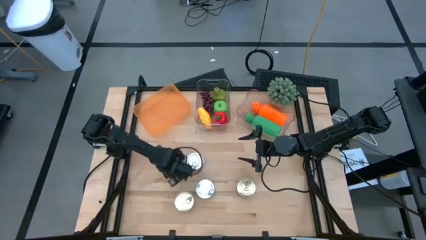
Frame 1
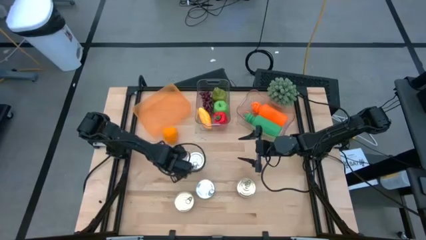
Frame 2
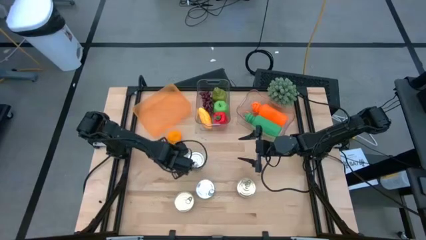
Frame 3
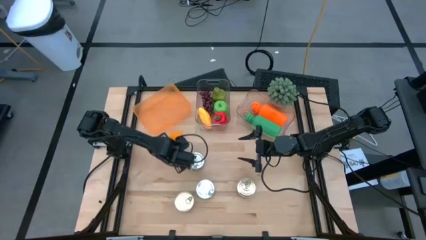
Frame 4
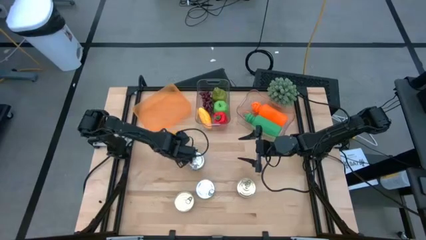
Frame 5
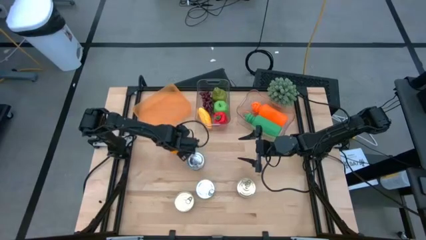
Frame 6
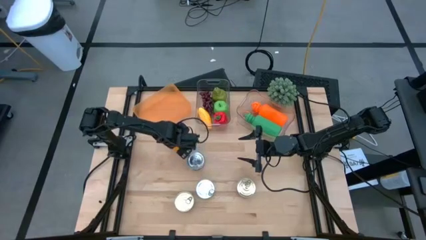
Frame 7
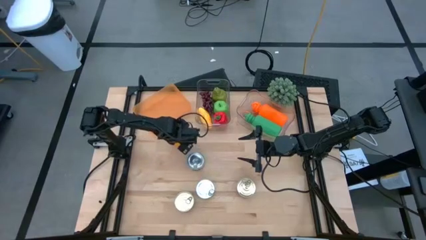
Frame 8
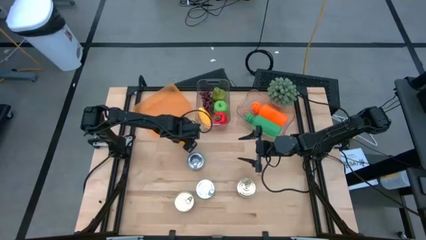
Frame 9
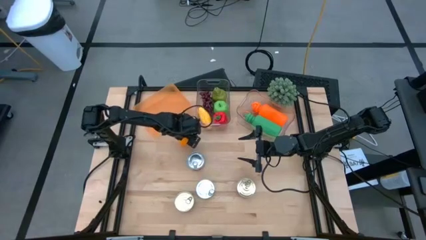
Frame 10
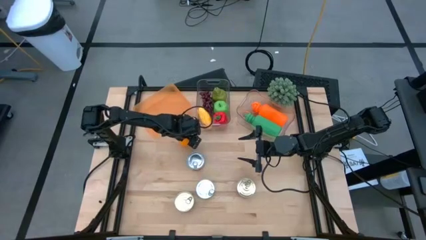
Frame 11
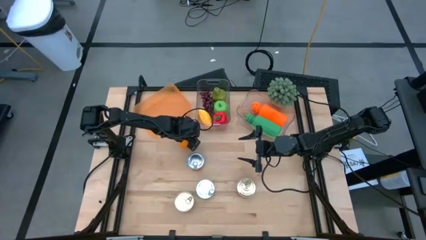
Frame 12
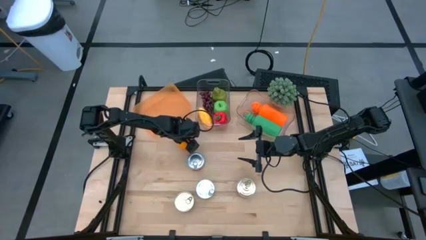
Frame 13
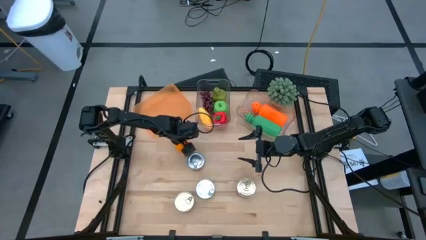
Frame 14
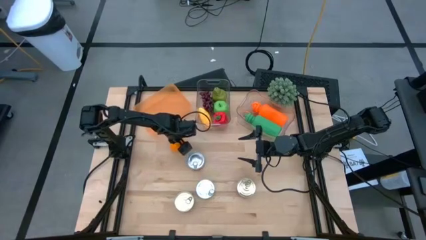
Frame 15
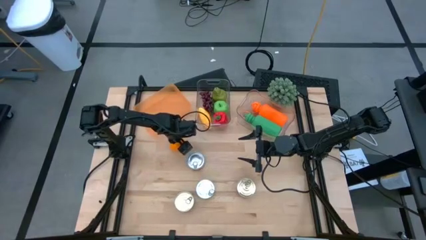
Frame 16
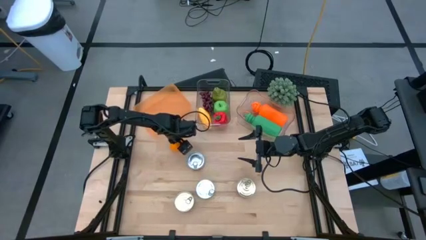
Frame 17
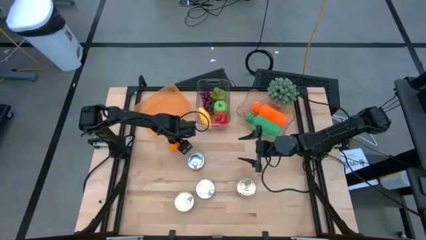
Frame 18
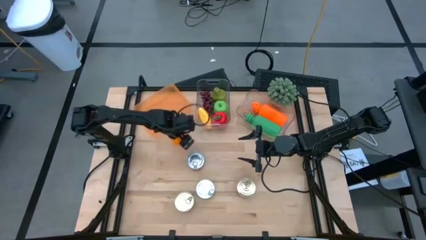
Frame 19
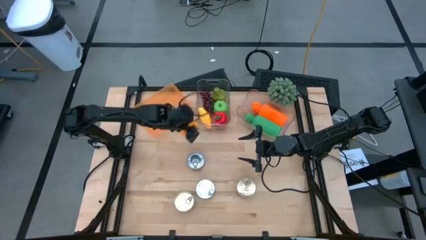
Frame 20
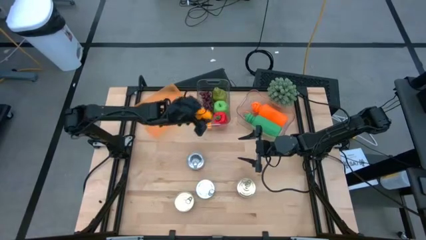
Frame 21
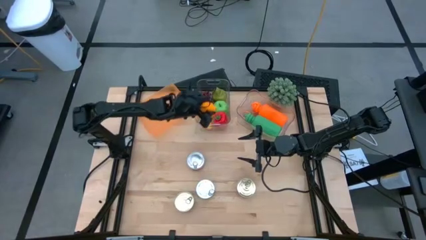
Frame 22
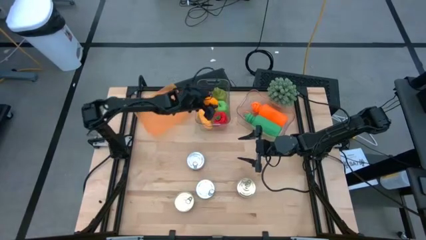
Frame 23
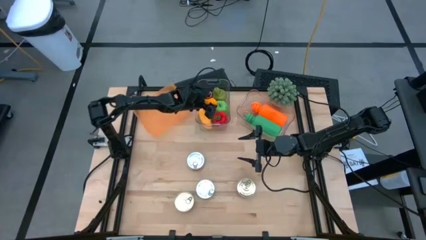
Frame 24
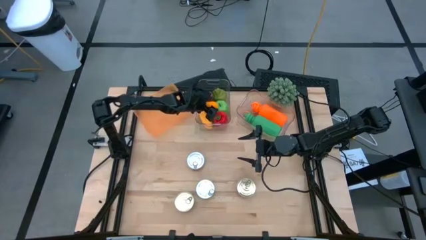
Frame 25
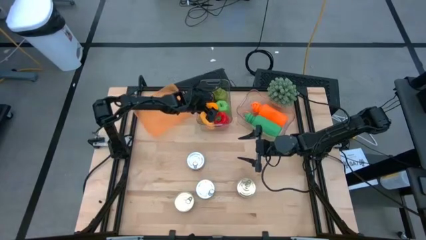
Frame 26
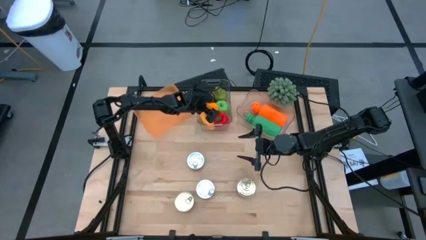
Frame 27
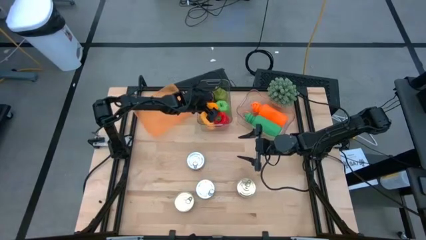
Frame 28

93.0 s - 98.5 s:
Task: Pick & Place Food Item
Put the orange into the left transparent bin

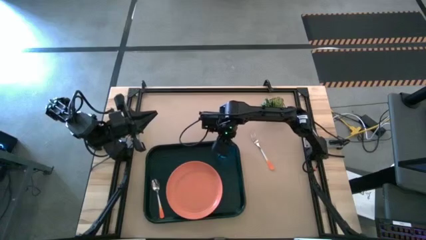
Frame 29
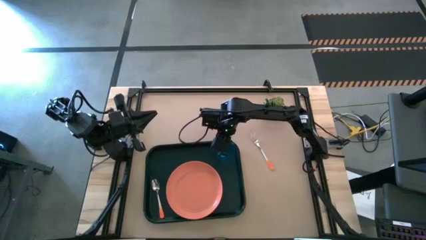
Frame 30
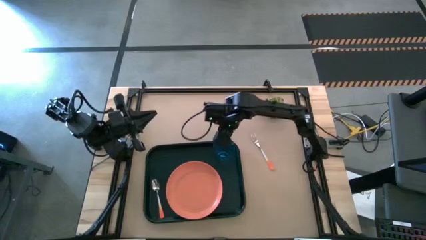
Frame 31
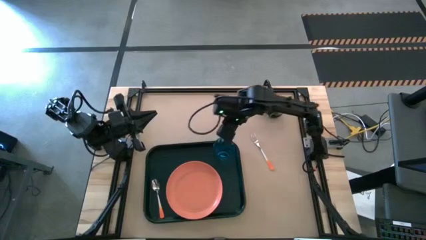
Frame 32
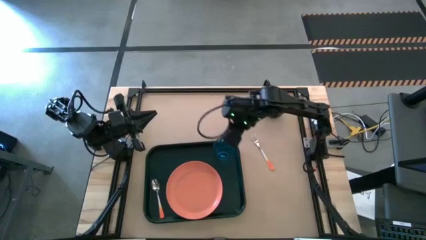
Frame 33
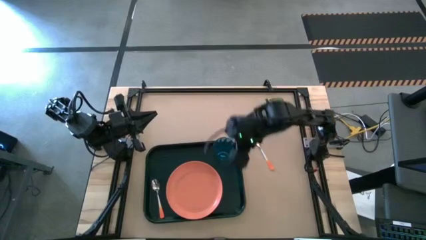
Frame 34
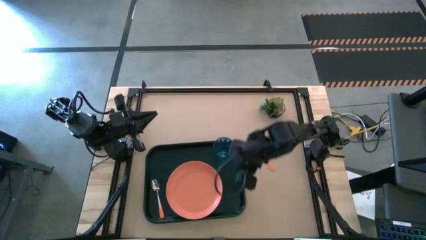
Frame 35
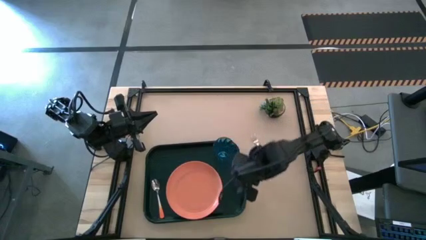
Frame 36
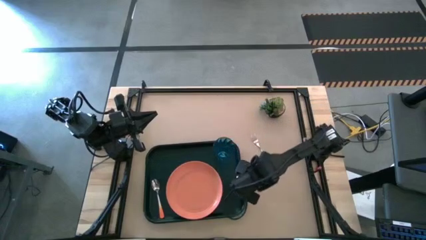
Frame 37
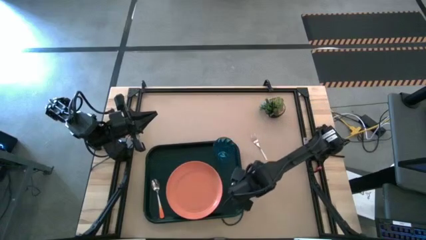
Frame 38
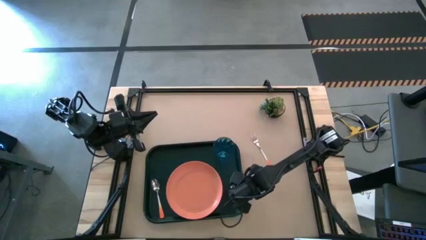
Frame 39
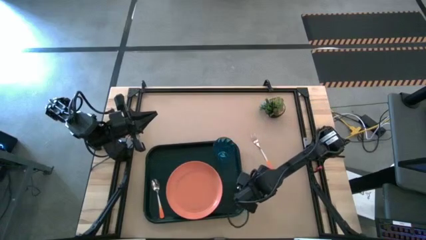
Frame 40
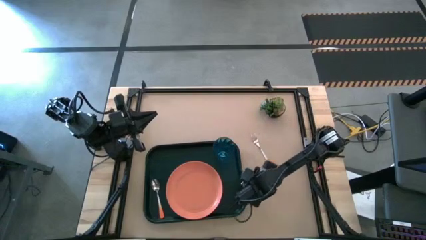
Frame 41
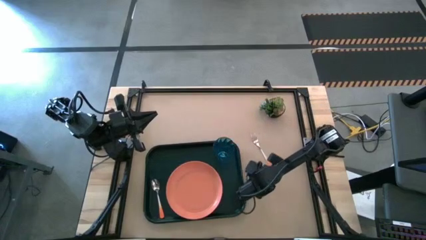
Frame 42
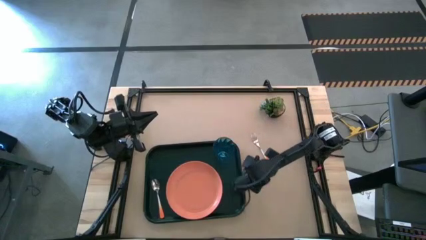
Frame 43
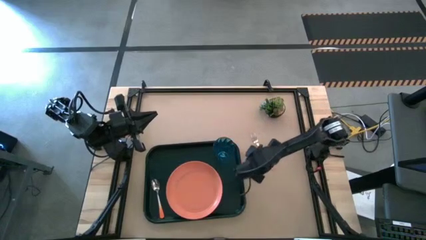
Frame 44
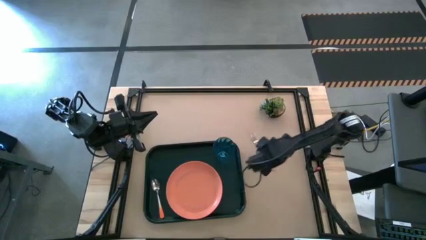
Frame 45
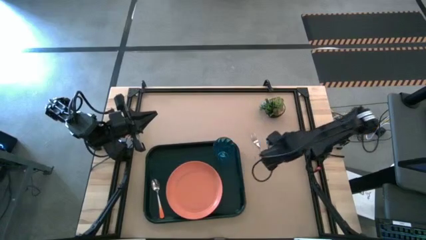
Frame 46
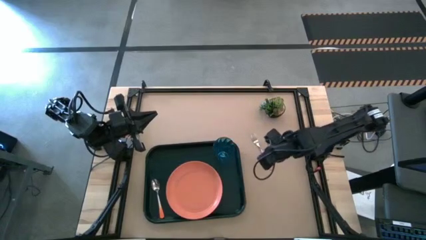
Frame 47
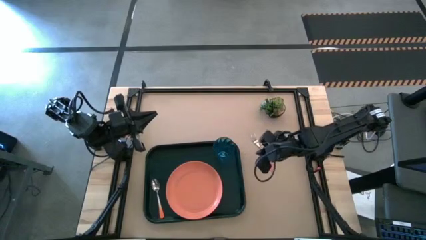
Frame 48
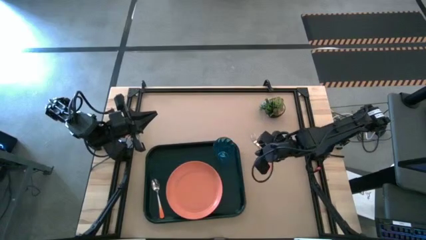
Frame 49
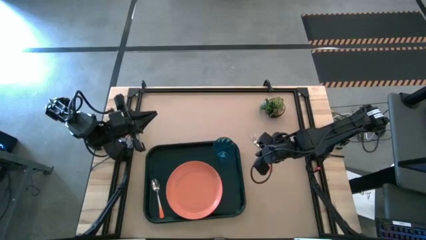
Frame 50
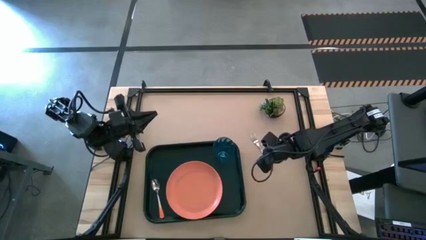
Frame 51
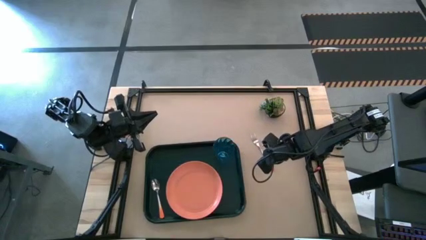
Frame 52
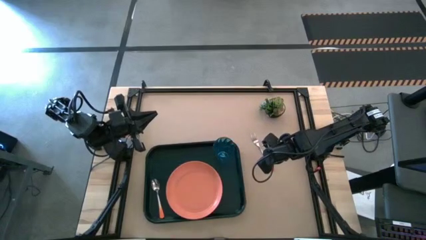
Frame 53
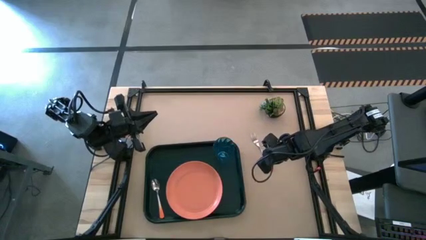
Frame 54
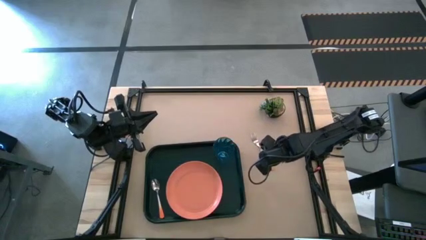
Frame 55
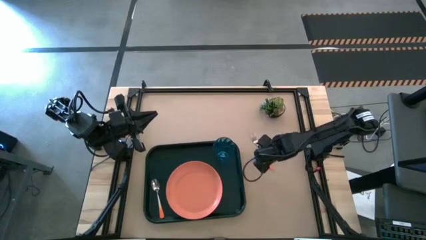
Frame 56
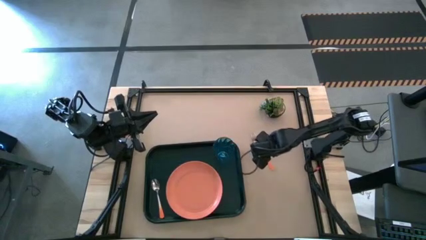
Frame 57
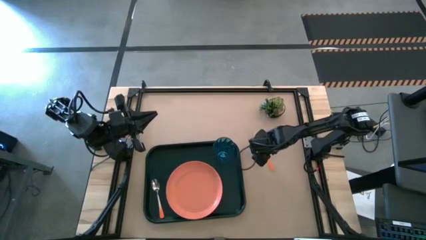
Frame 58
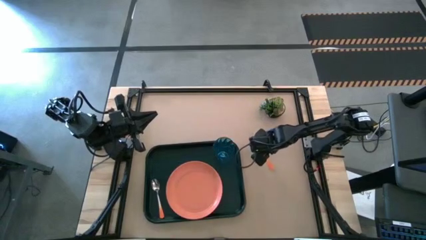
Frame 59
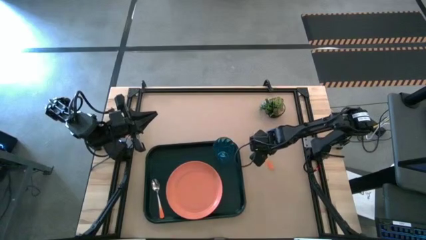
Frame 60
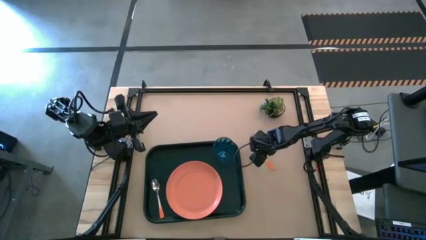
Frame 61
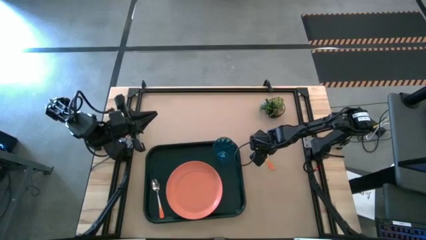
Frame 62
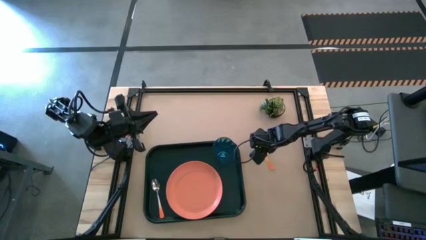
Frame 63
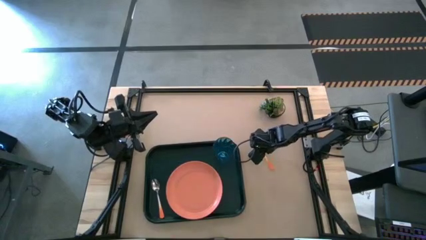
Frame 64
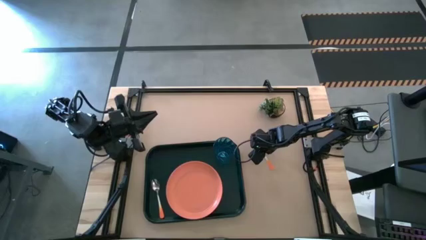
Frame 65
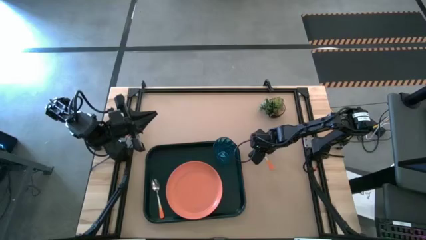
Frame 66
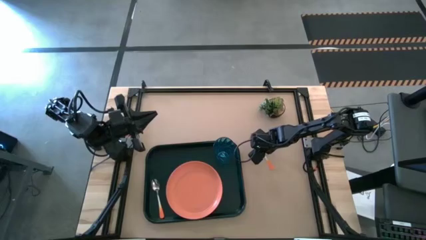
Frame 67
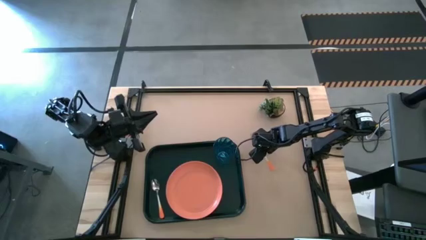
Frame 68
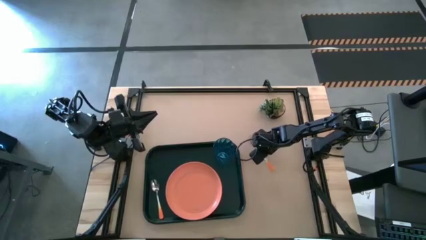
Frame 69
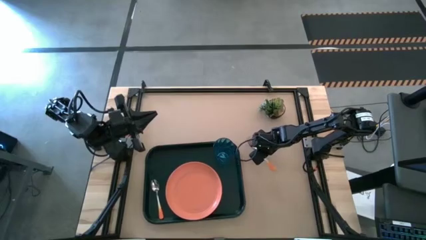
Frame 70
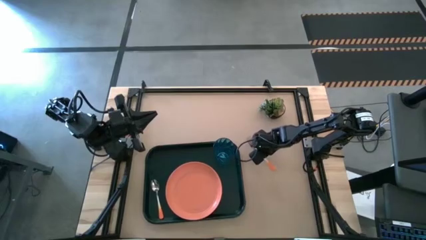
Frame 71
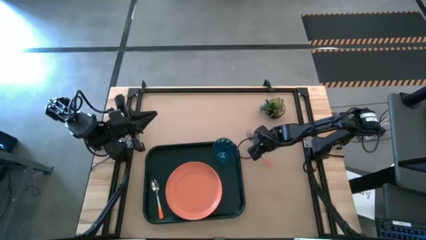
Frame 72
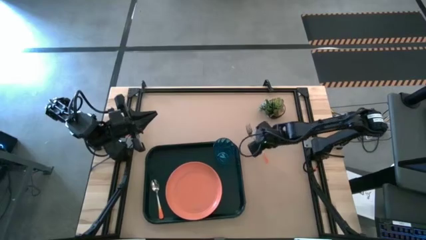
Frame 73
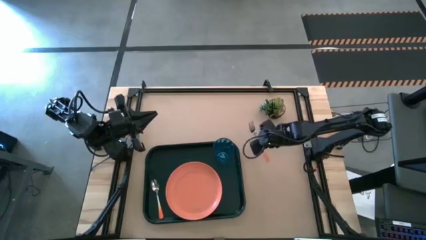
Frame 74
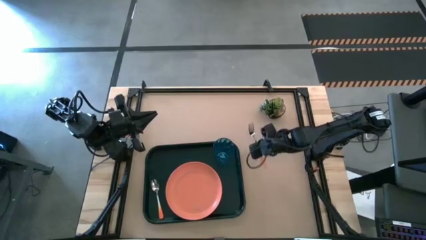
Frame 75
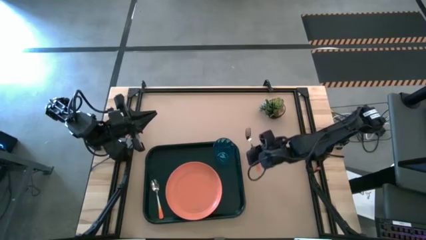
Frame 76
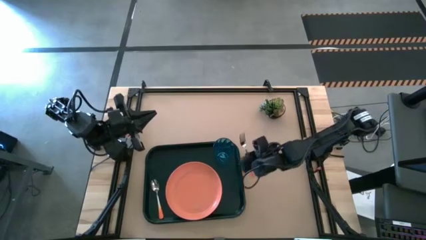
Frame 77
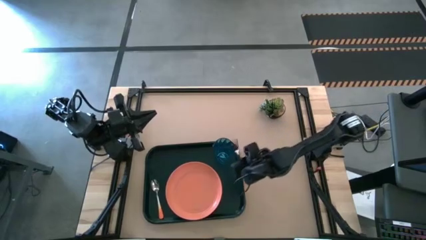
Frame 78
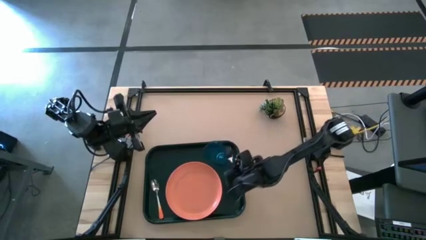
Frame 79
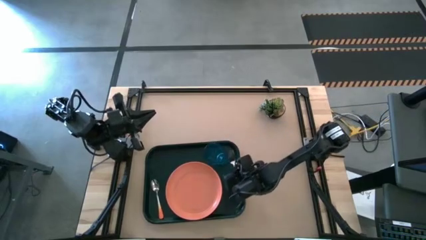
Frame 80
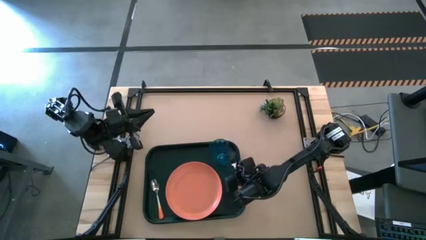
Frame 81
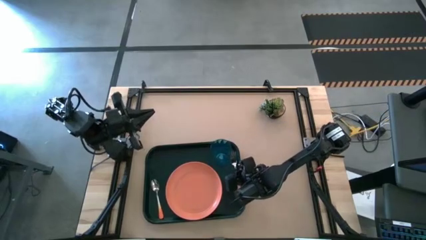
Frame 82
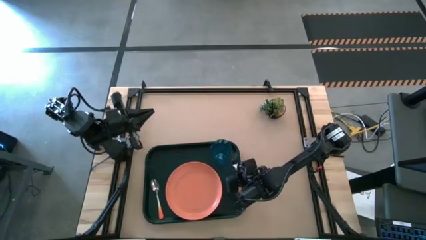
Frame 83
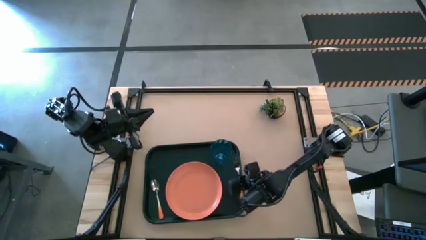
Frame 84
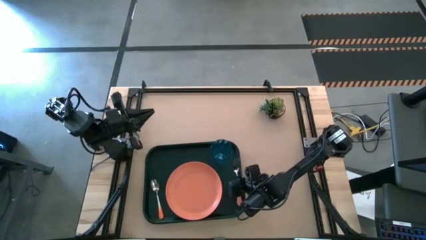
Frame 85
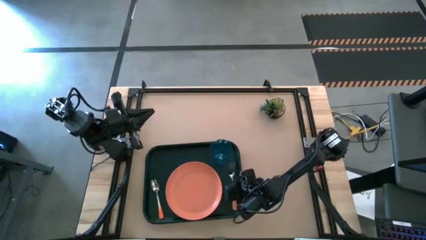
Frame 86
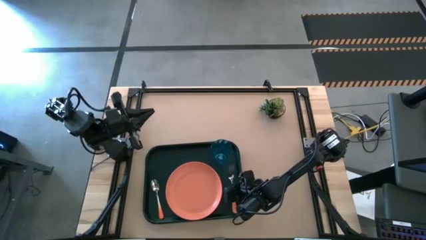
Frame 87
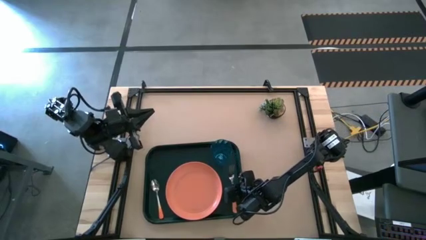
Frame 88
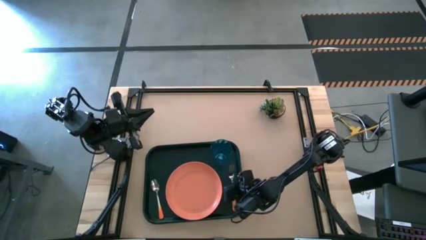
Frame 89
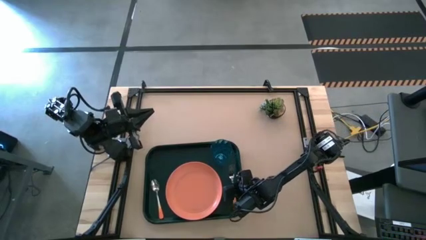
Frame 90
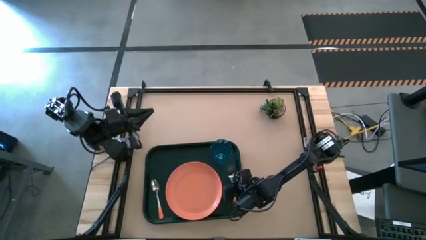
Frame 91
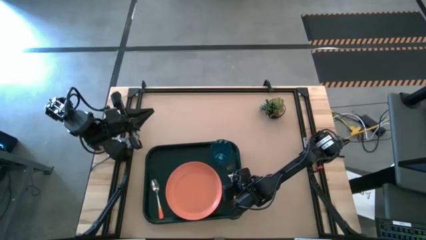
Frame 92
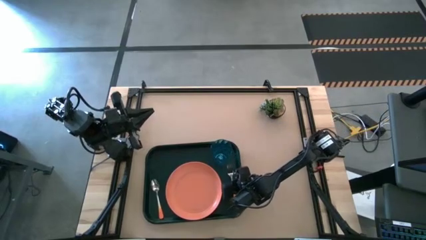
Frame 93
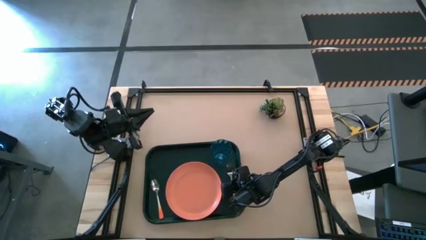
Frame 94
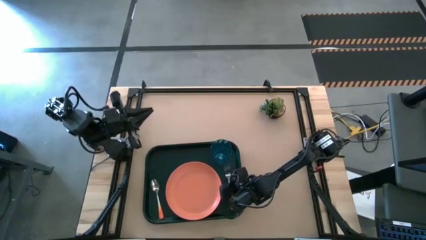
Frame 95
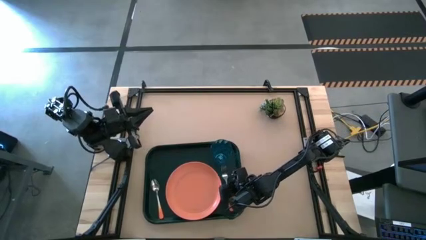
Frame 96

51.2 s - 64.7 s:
Task: Pick and place plate/cup/fork/spoon on tray
Put the orange fork on the dark green tray
